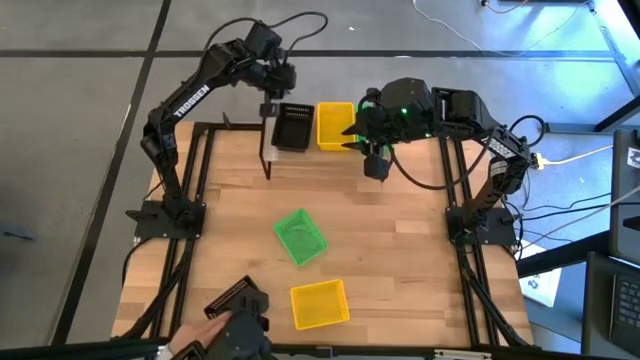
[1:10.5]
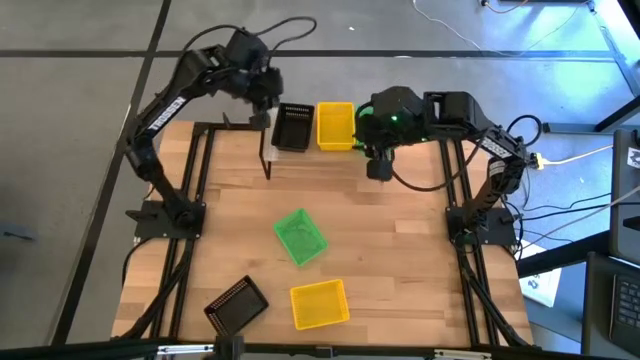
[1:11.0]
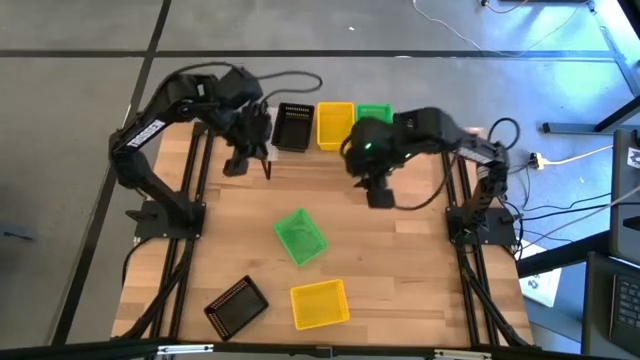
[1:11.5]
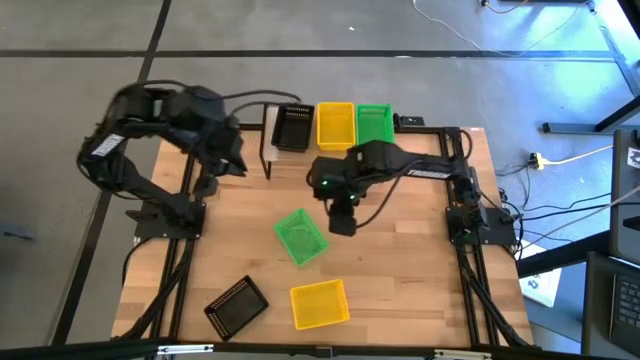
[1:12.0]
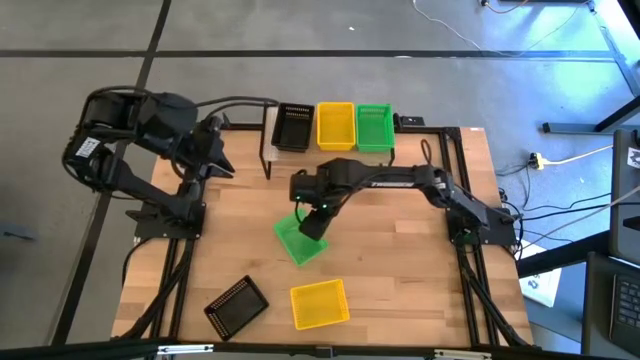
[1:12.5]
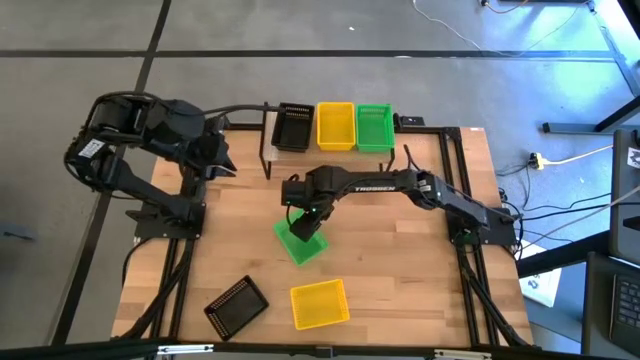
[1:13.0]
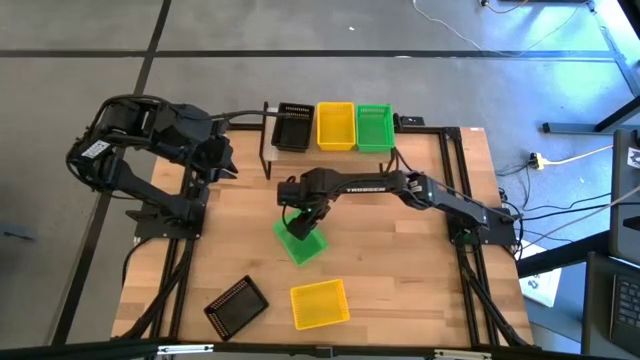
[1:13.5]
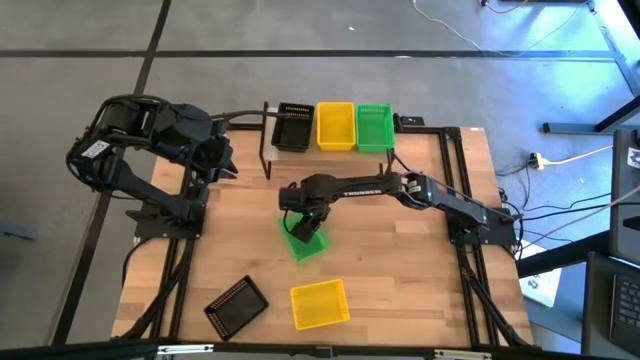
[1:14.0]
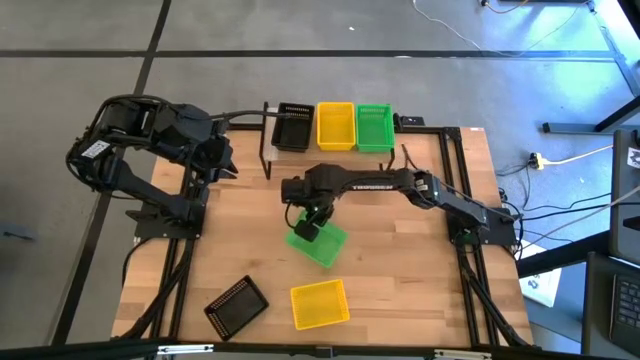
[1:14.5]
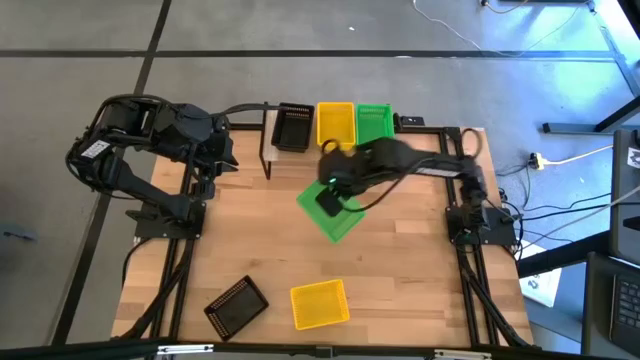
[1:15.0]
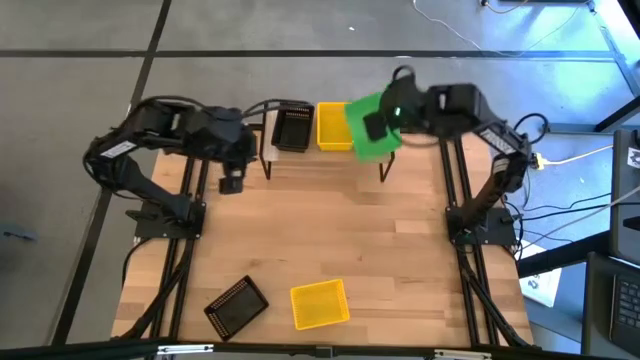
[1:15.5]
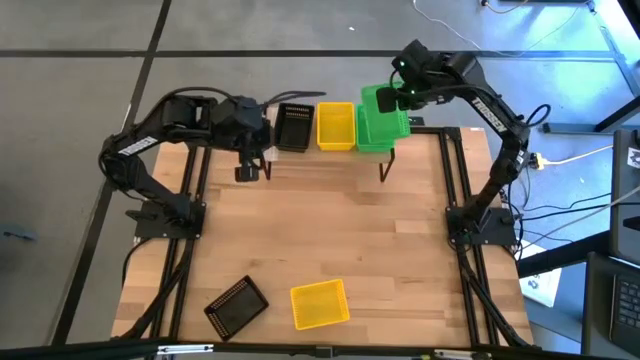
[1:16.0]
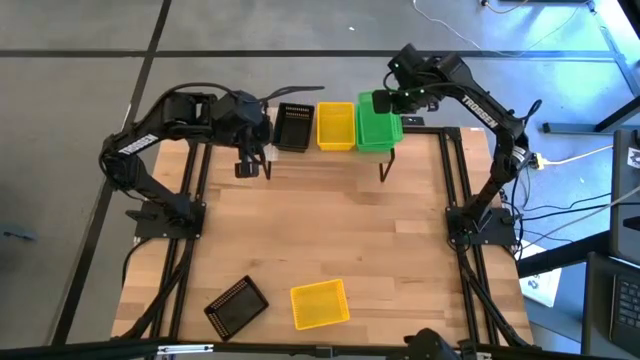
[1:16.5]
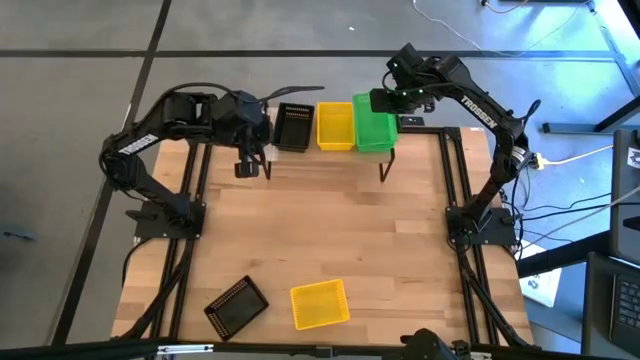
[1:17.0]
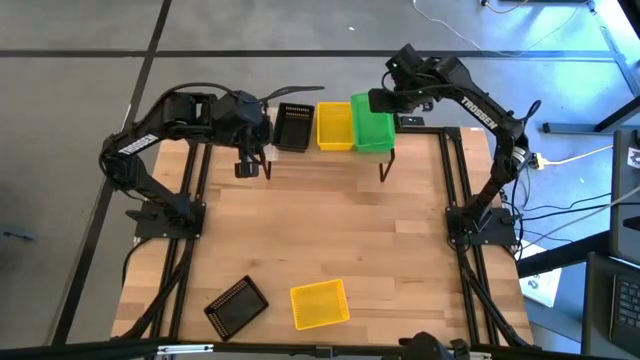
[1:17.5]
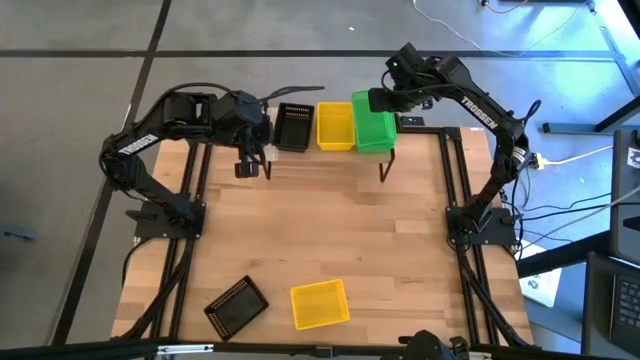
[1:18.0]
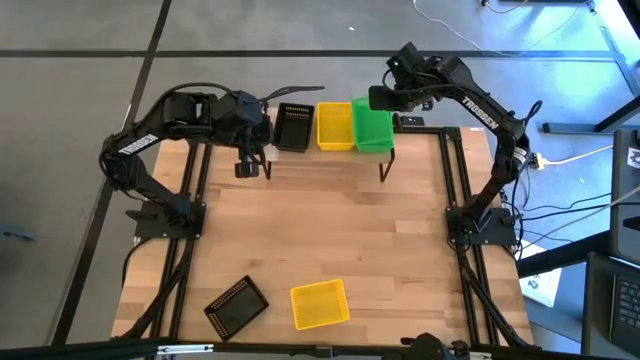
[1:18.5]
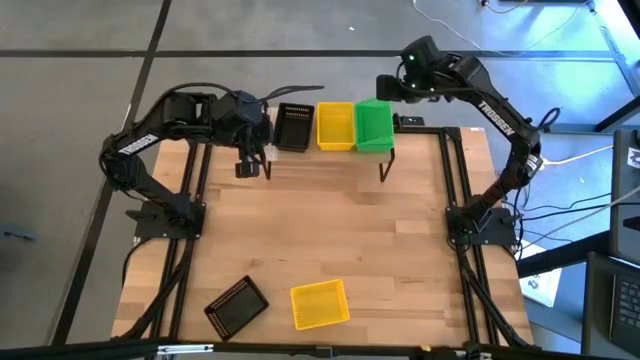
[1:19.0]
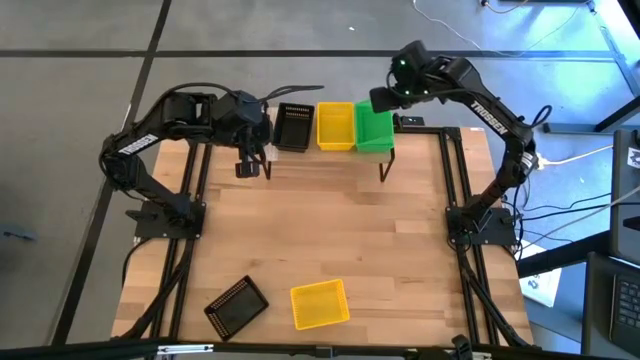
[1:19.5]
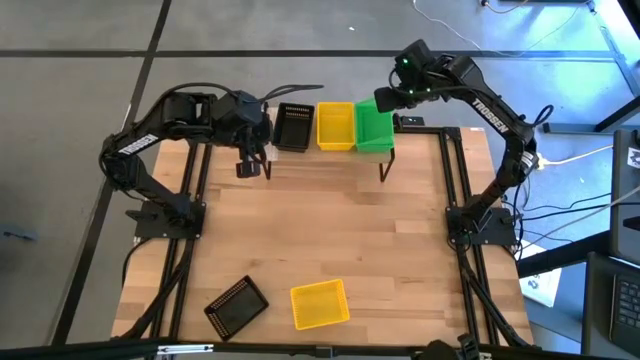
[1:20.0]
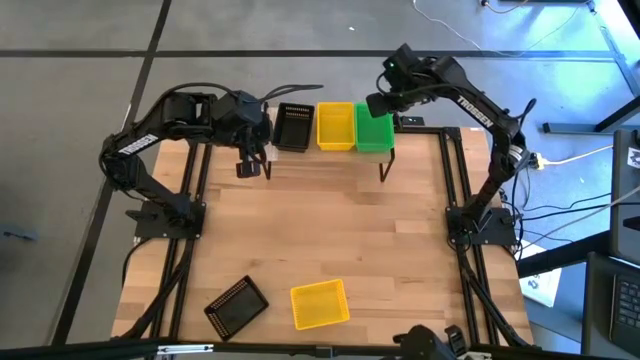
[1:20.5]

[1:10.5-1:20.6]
Task: Stack baskets on shelf by color
Stack the green bin on top of the other green bins on the shelf

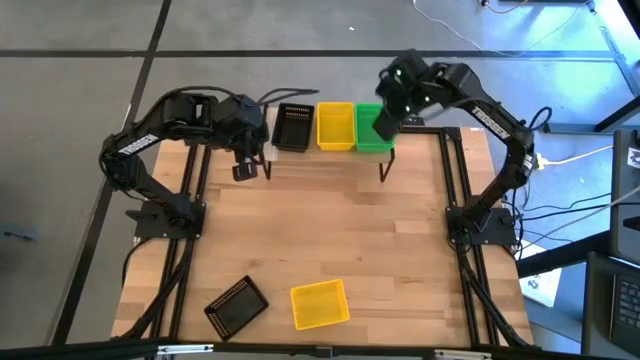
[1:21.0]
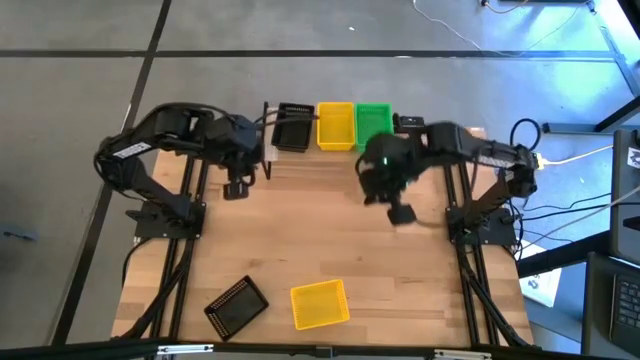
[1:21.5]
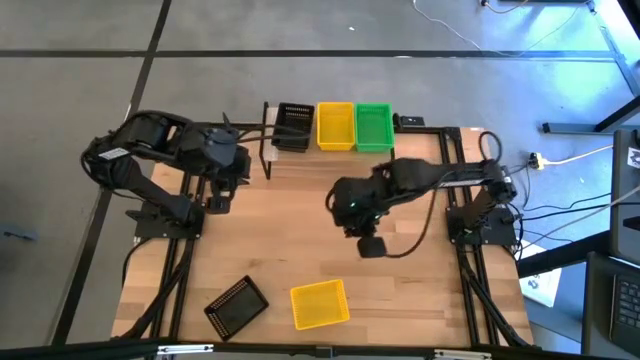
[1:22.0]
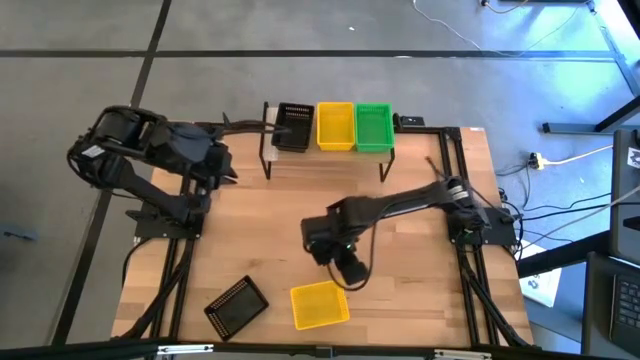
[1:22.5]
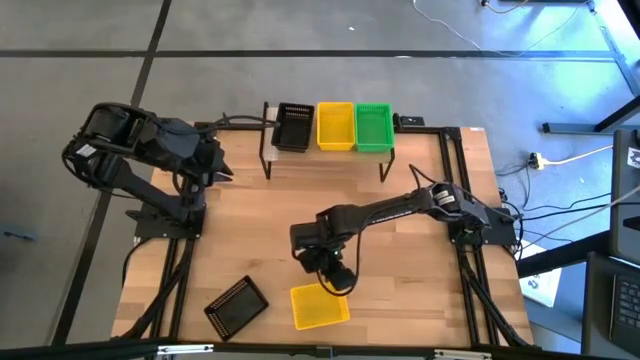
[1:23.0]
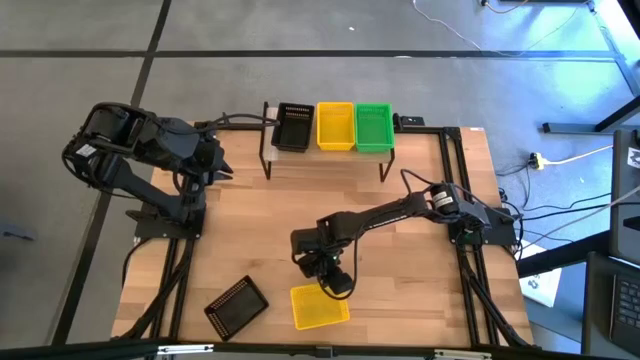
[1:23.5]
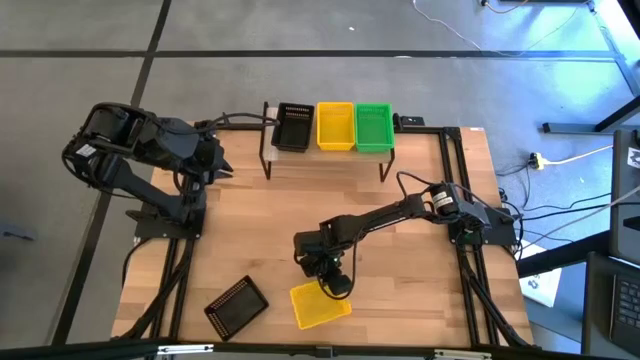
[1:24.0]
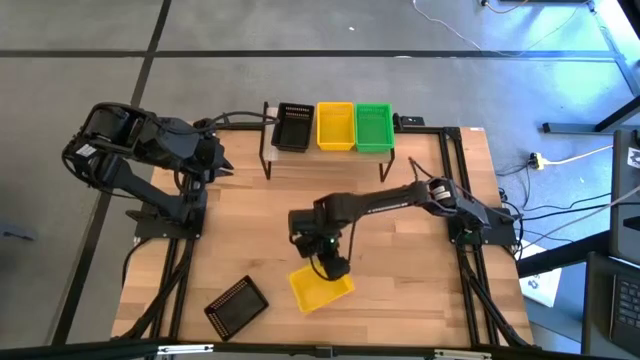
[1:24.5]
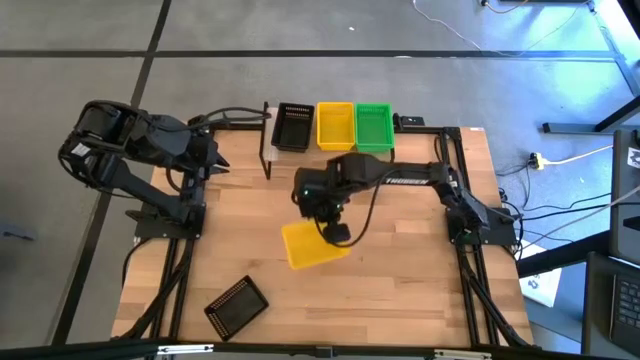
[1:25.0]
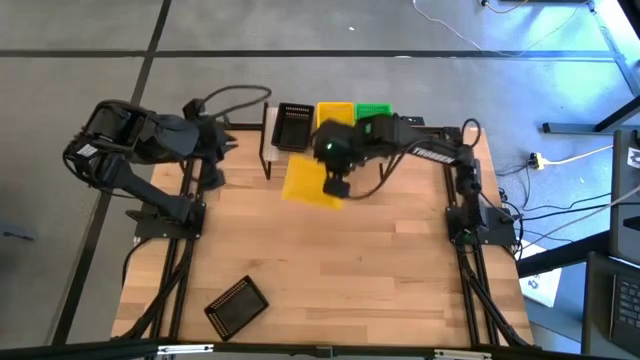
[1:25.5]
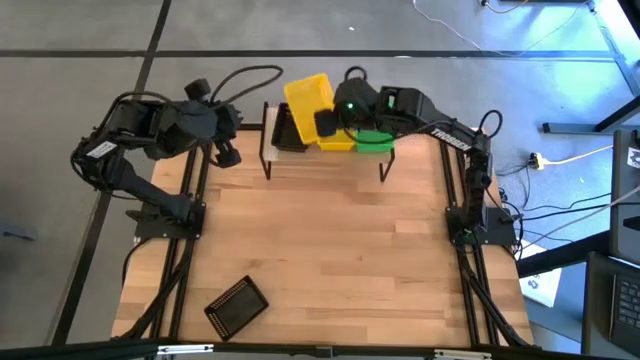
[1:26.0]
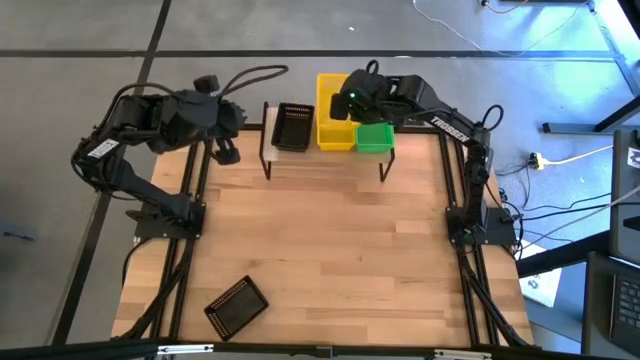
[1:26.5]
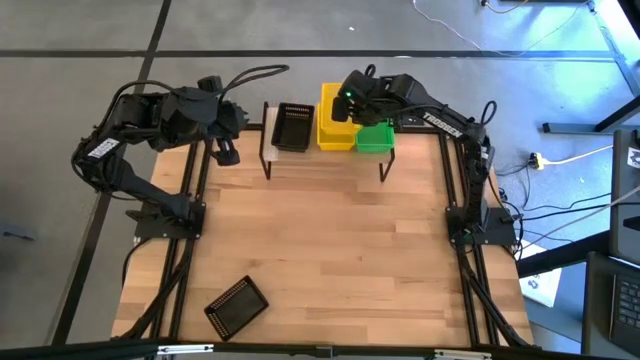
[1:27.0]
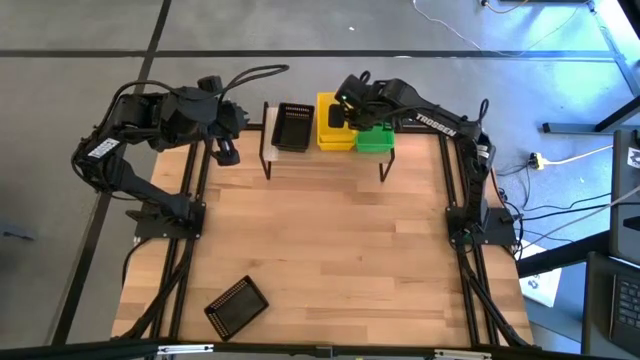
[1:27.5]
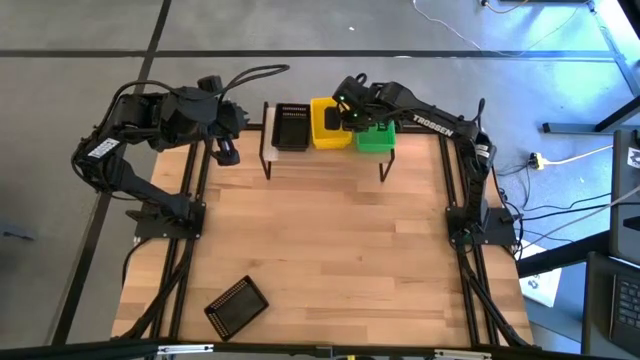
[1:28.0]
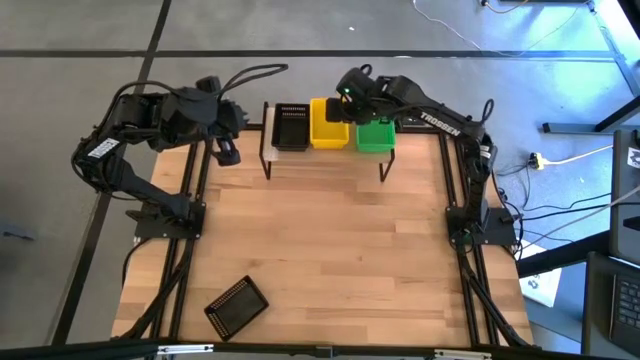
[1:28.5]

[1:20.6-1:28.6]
Stack the yellow bin on top of the other yellow bins on the shelf

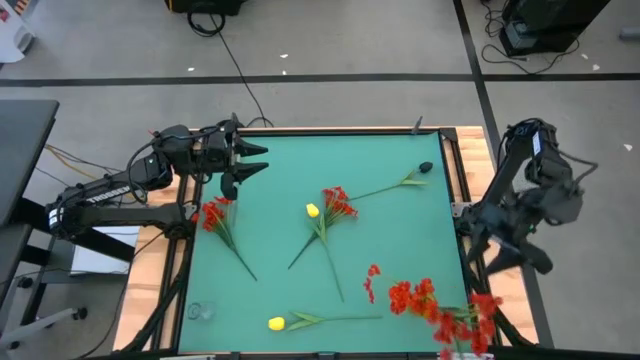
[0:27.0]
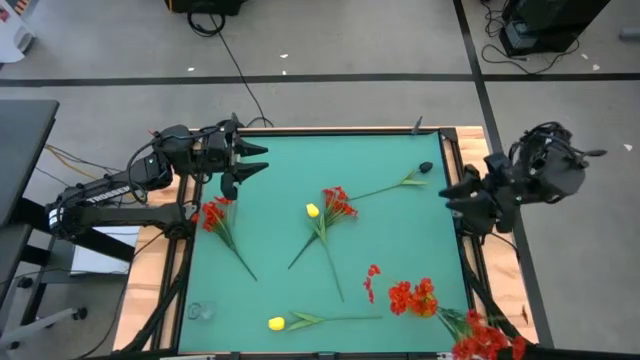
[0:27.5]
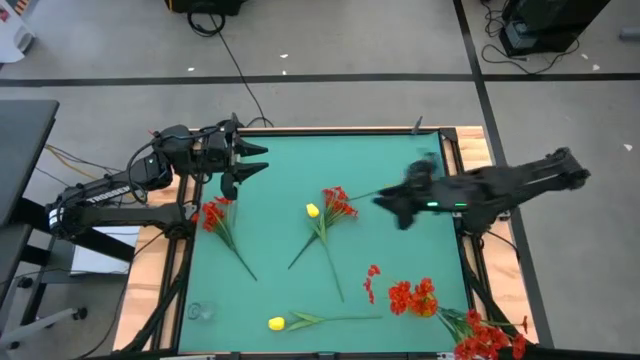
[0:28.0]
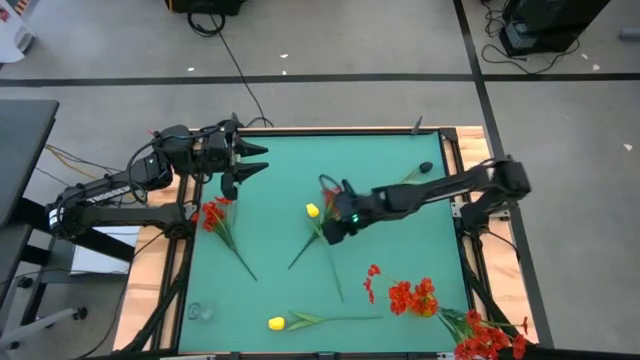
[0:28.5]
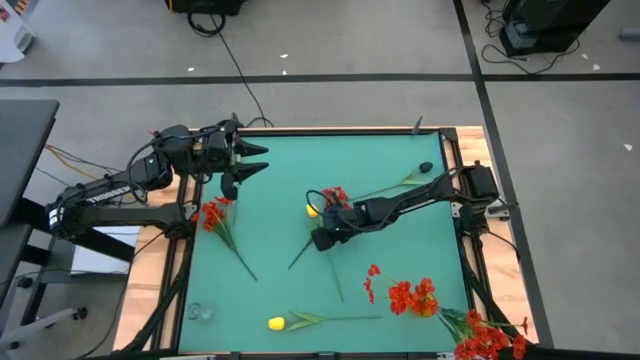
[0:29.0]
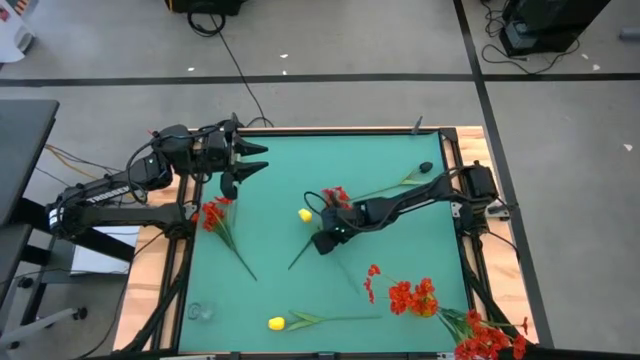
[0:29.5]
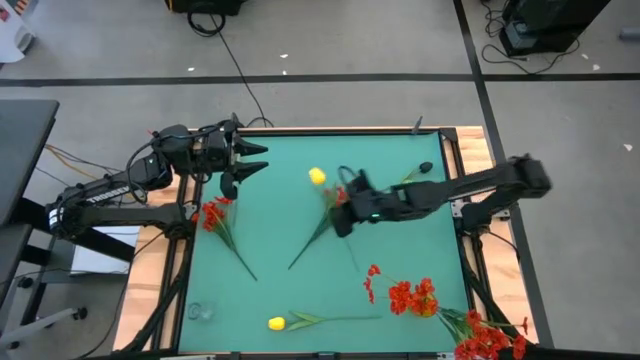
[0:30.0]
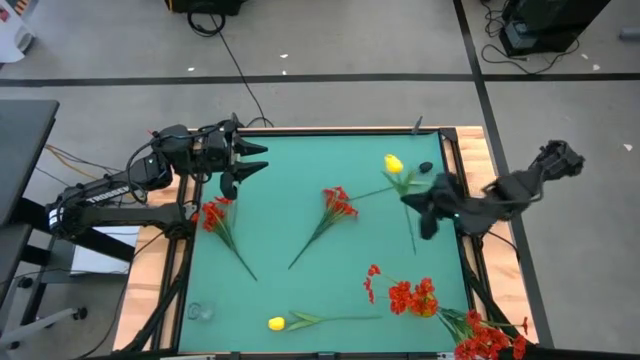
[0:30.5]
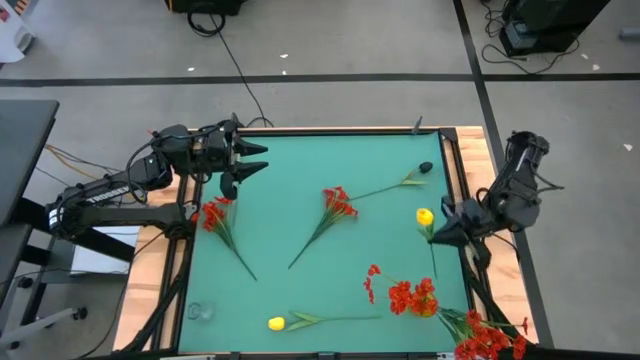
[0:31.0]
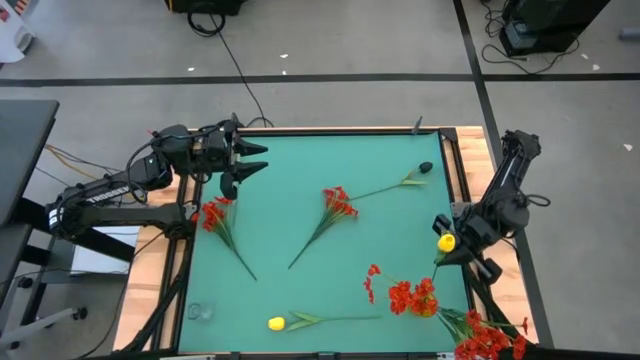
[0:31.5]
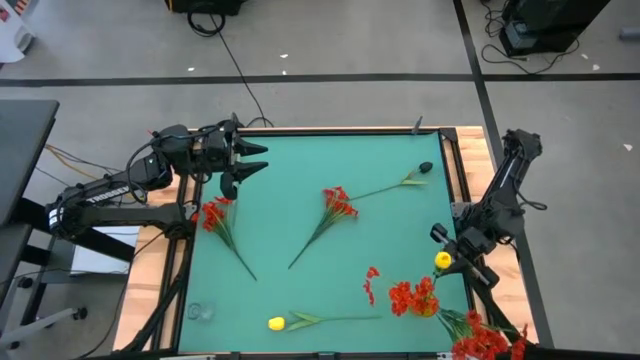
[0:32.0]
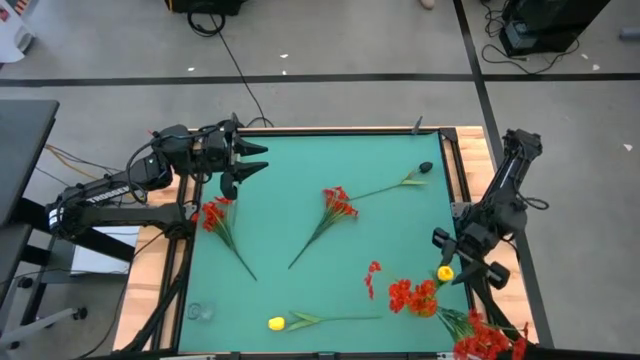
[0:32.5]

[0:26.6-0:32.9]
Task: Sort flowers into vase by color
Put the top yellow flower into the yellow flower vase
